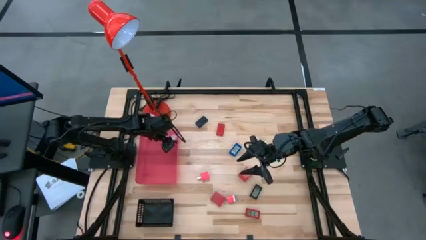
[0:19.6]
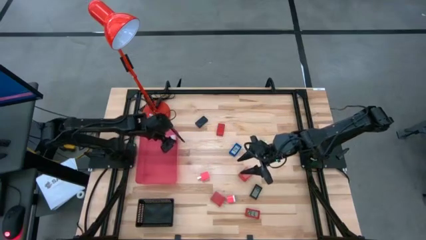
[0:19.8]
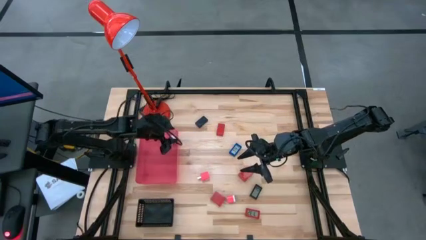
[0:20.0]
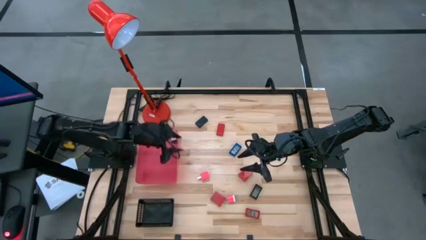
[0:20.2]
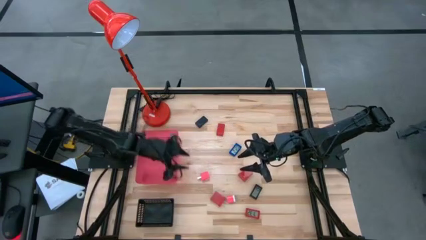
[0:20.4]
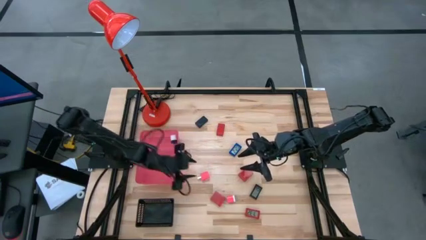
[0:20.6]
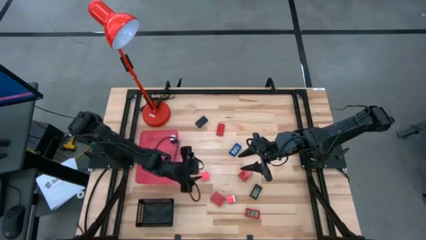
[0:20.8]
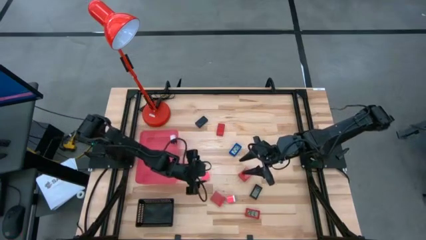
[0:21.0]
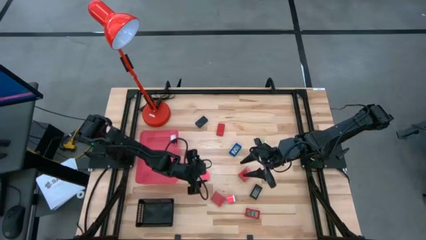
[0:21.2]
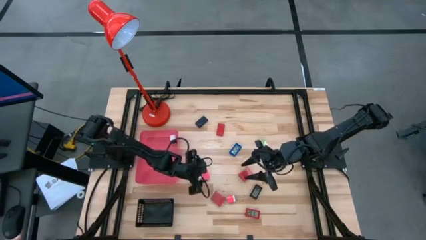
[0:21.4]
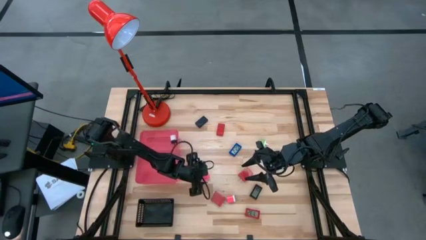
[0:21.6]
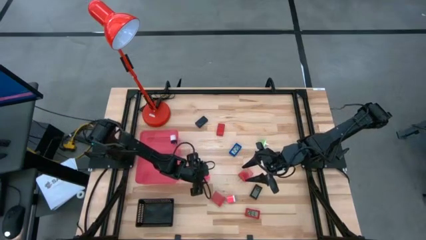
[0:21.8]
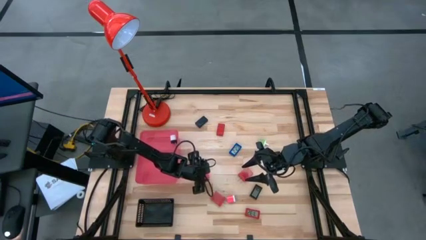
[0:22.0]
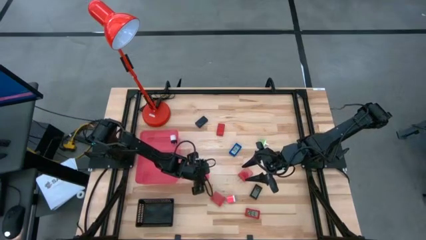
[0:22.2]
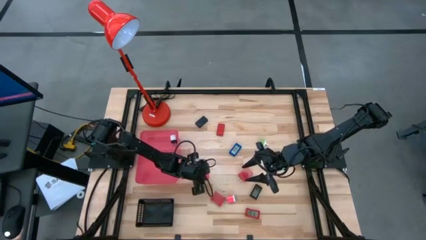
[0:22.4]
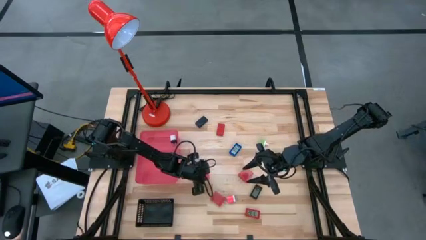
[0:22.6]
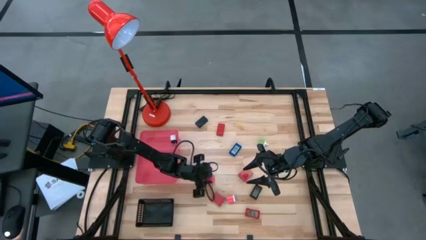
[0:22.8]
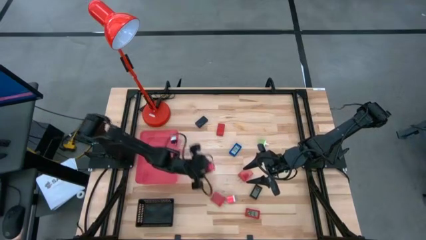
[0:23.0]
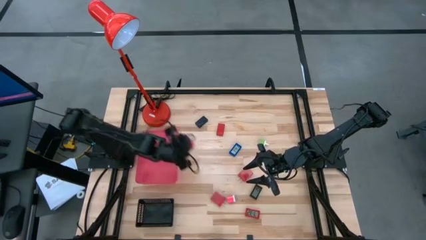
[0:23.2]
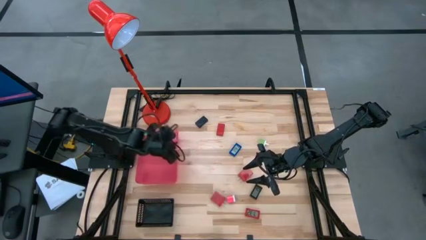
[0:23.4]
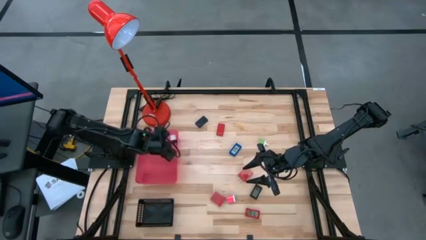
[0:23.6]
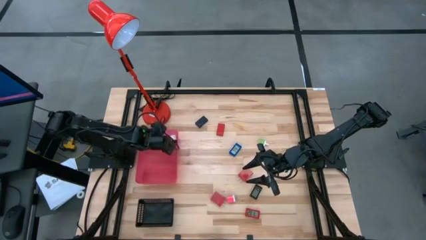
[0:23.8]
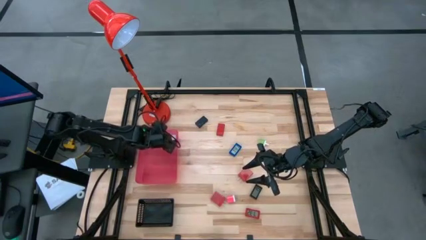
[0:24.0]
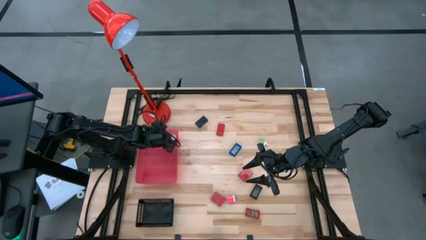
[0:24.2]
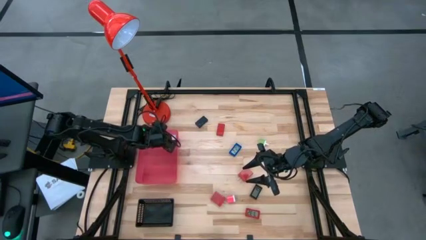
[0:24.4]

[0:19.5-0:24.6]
Task: Pick & Place Office items
Put the left pink charger adapter into the red bin

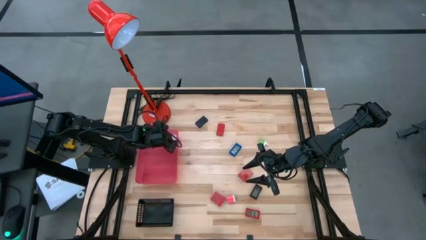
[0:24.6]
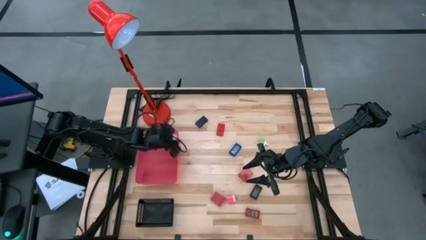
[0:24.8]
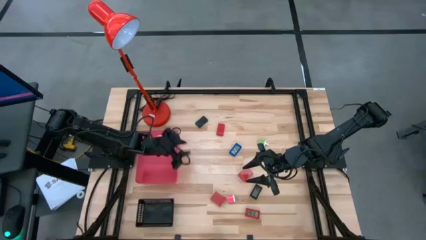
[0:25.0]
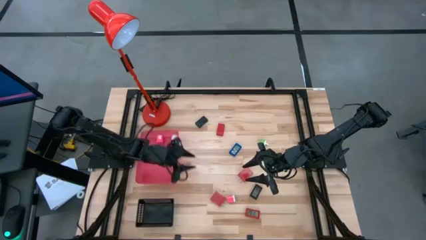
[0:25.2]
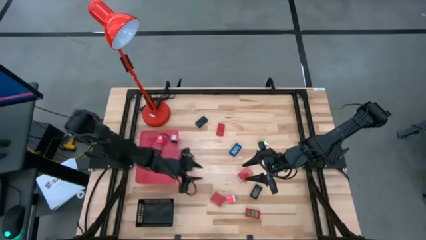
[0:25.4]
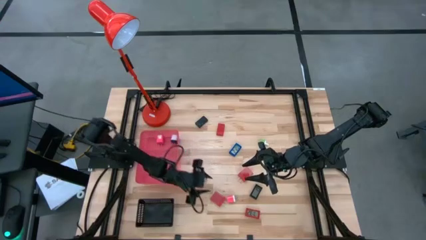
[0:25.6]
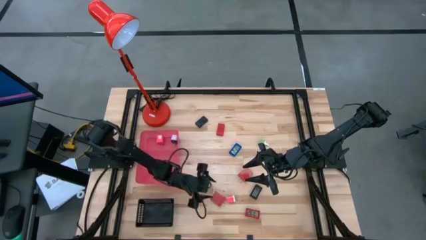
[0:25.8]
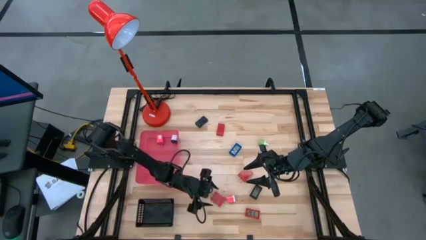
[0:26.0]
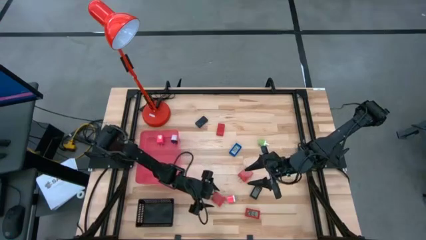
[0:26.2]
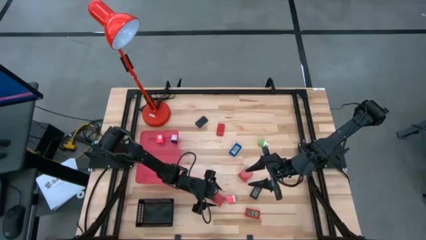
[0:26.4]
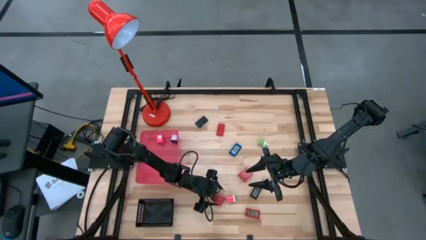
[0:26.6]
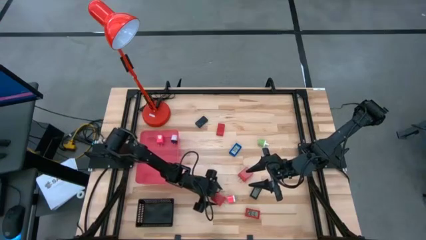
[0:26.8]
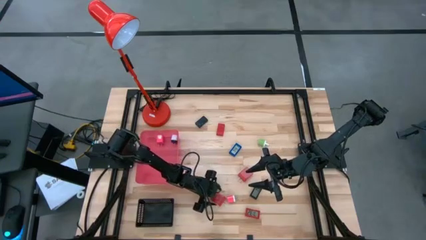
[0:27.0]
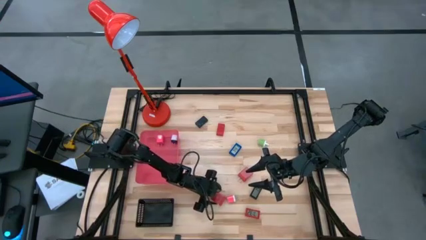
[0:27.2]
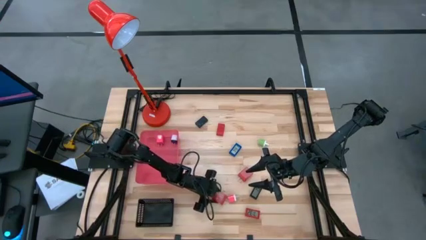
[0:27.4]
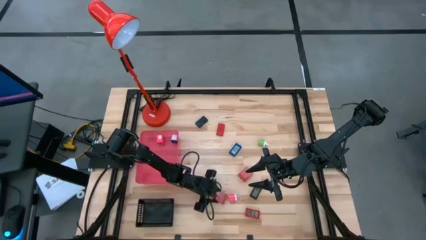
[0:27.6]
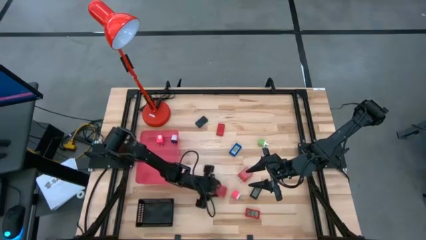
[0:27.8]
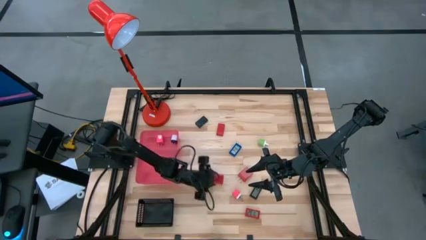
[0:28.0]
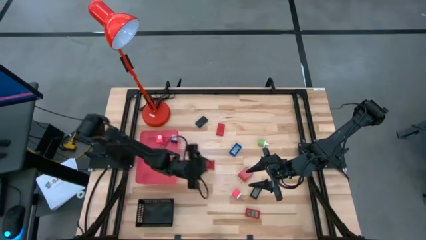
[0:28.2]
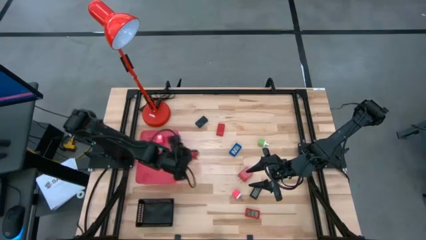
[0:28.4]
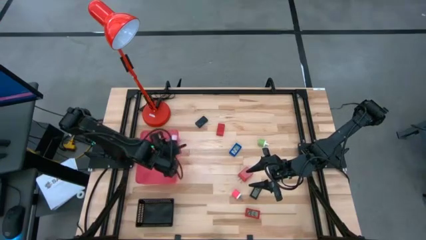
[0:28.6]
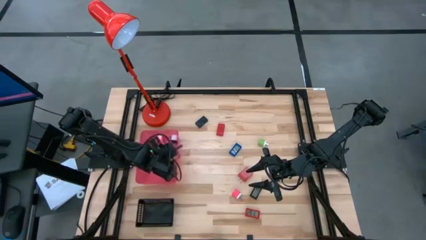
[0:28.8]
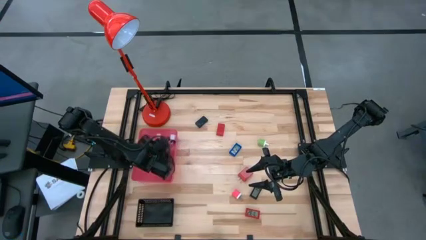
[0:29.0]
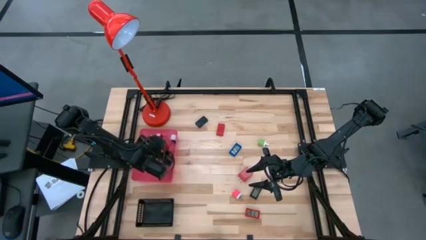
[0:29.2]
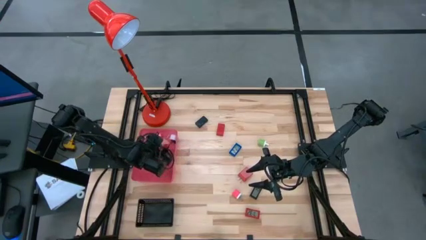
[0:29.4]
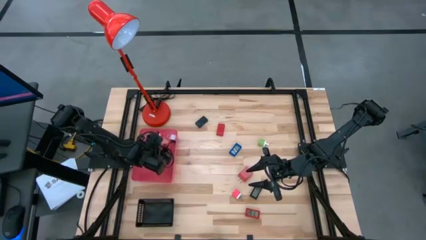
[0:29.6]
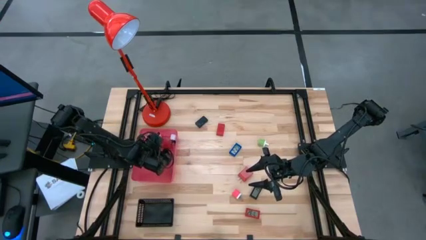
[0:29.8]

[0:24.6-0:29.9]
Put the left red charger adapter into the red bin

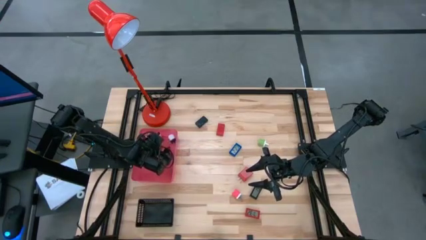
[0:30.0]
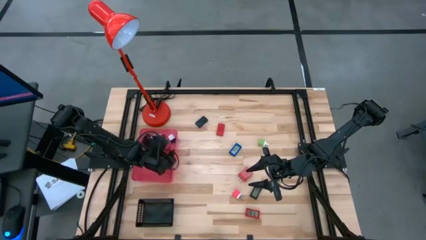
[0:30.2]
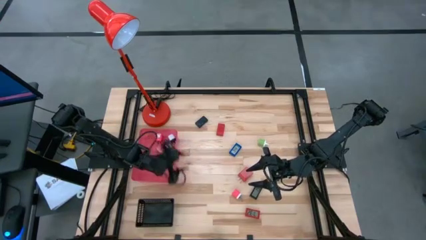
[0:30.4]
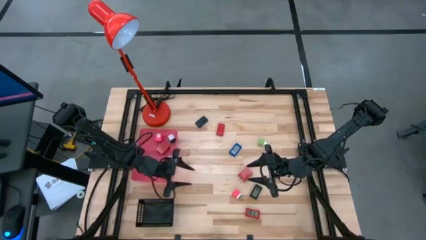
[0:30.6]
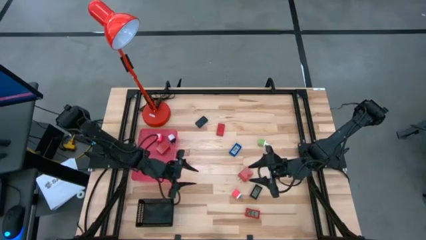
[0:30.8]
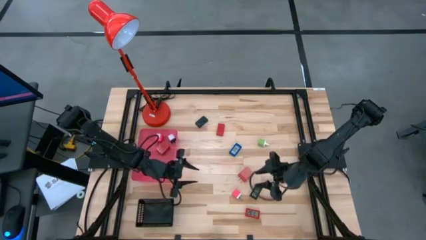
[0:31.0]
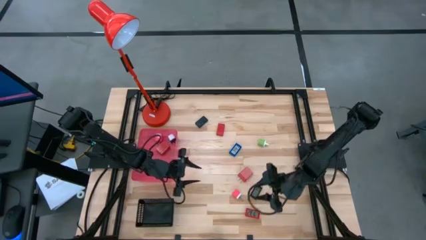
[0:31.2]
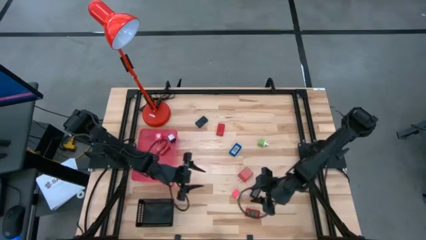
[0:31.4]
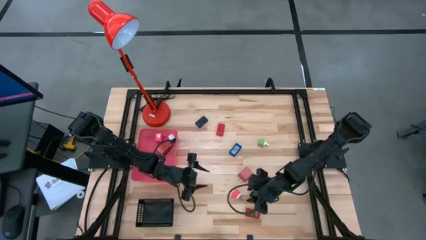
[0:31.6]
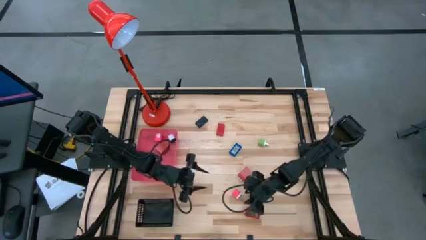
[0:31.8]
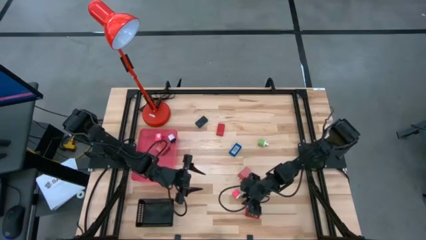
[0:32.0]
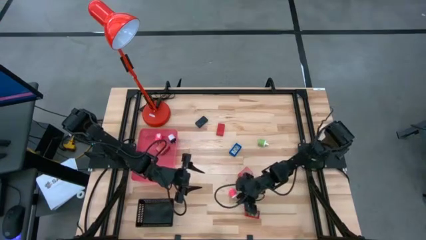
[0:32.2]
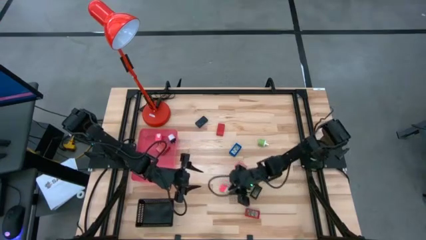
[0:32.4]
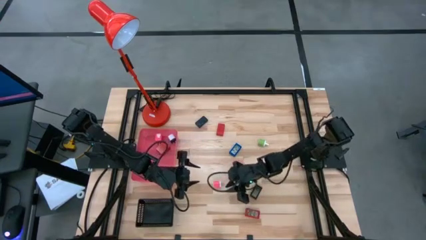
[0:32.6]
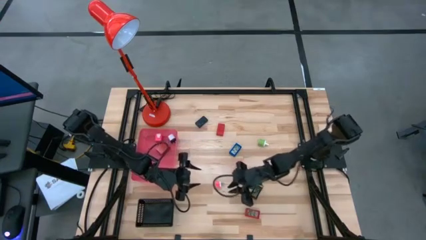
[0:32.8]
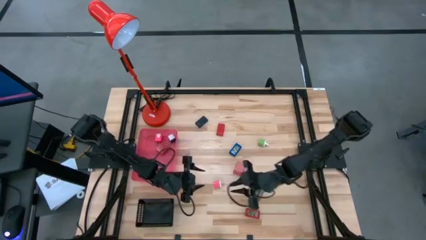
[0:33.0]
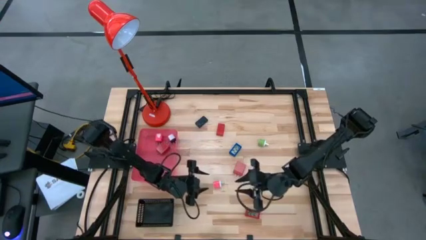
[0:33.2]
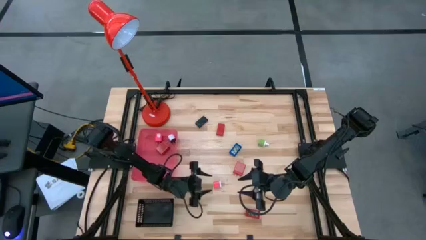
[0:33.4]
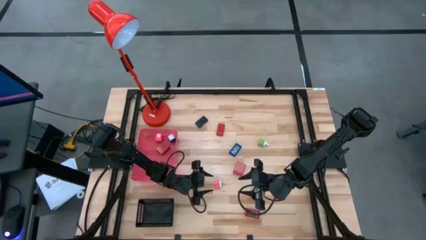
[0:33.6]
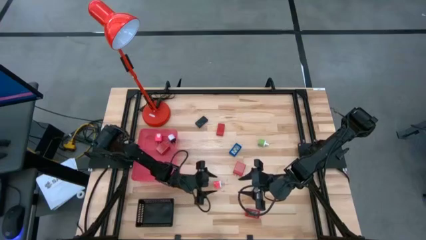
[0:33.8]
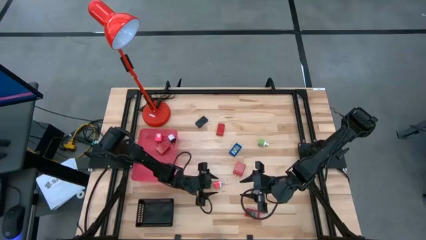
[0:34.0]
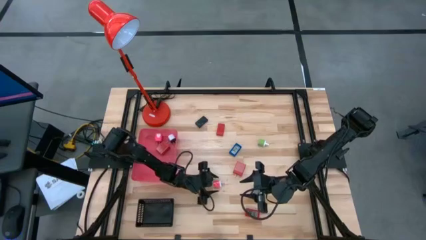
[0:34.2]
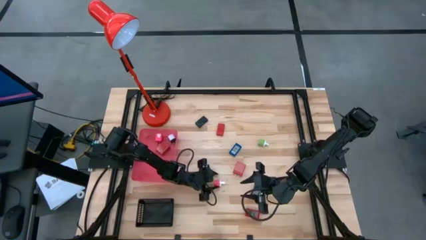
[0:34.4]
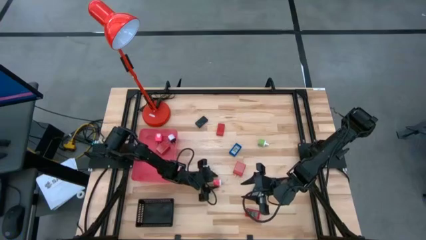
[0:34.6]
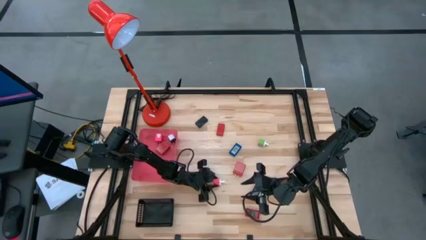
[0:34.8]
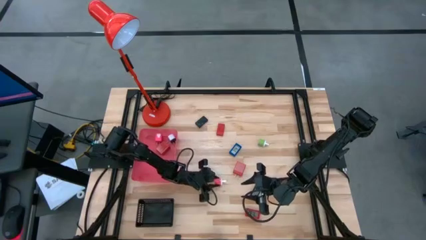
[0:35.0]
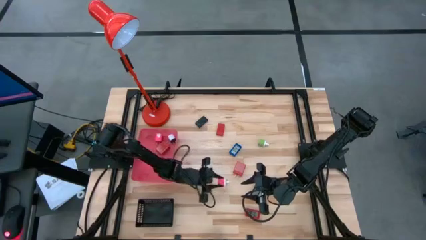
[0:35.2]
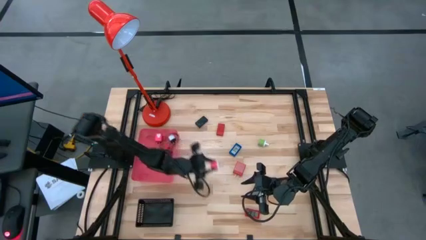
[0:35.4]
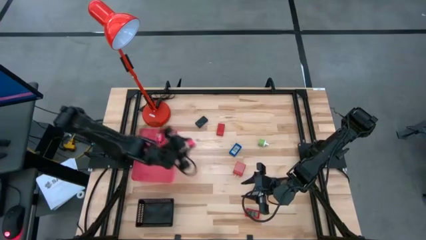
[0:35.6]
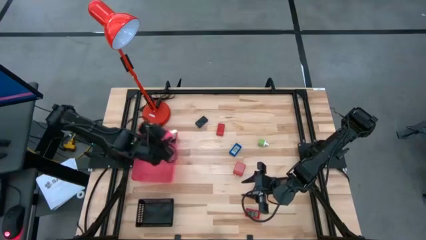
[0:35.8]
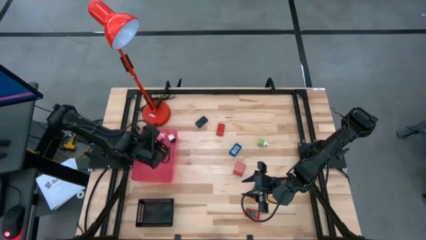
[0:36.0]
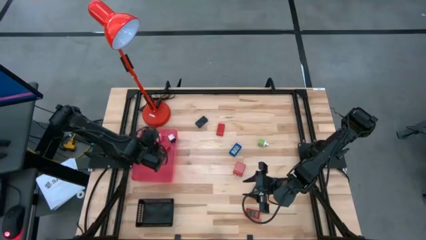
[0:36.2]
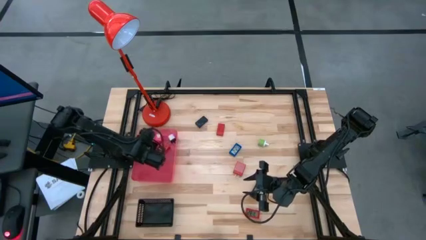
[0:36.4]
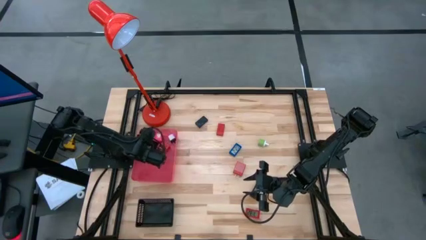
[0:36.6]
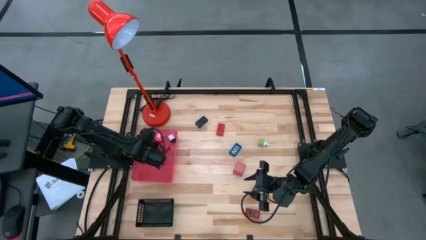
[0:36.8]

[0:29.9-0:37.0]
Put the pink charger adapter into the red bin
